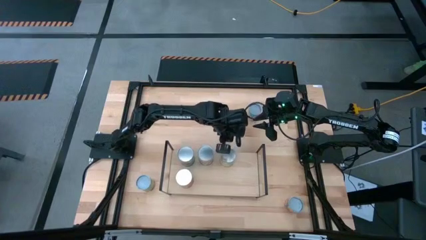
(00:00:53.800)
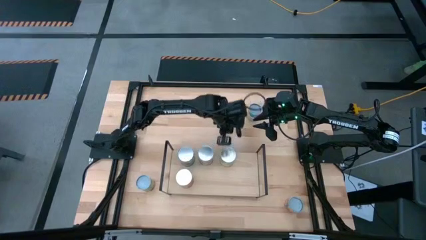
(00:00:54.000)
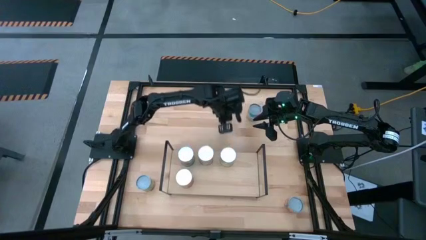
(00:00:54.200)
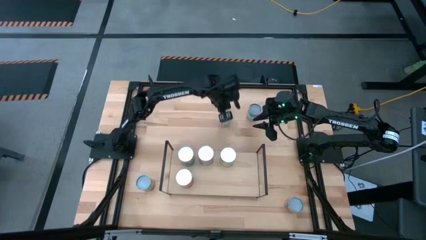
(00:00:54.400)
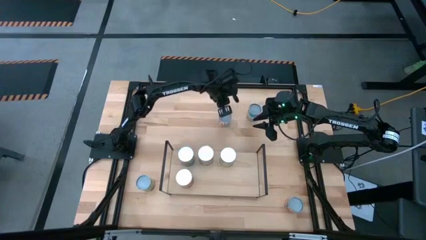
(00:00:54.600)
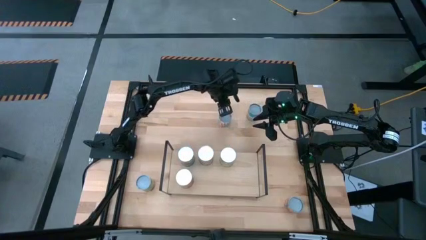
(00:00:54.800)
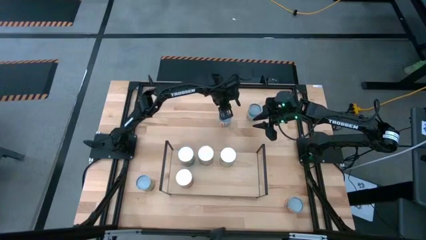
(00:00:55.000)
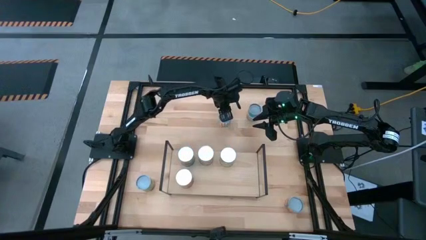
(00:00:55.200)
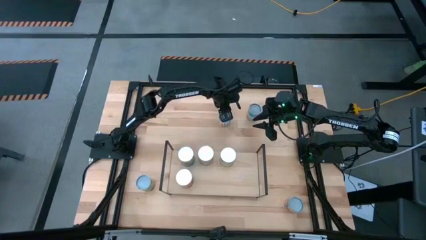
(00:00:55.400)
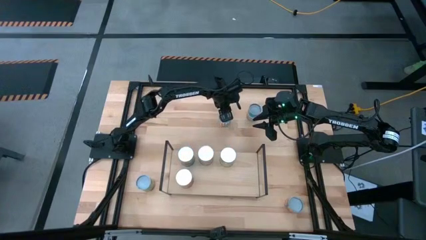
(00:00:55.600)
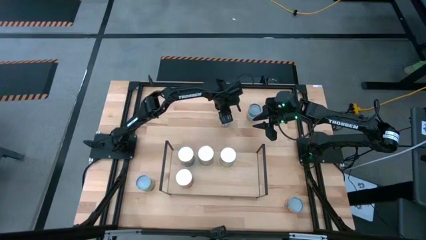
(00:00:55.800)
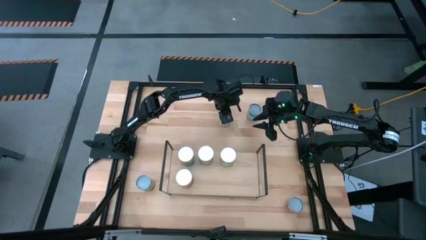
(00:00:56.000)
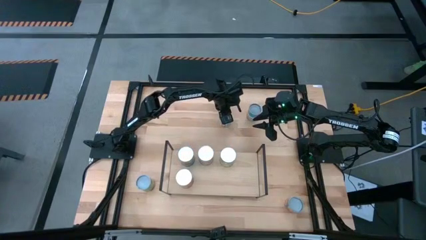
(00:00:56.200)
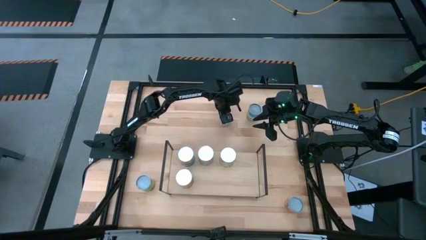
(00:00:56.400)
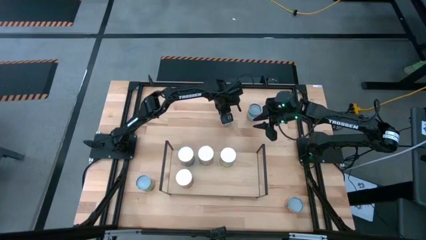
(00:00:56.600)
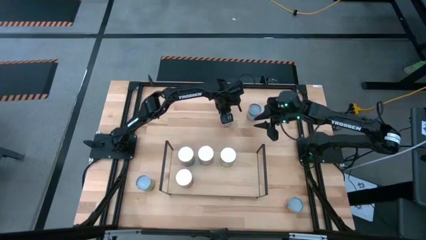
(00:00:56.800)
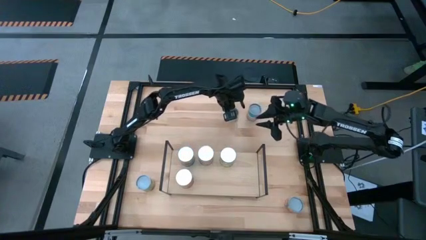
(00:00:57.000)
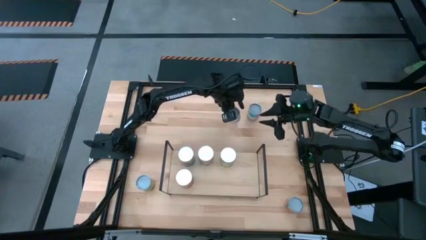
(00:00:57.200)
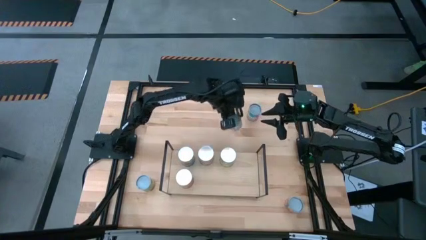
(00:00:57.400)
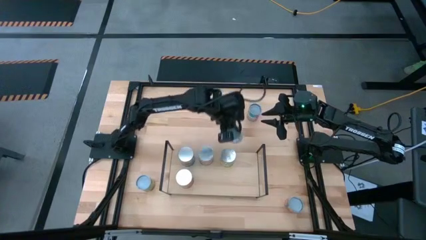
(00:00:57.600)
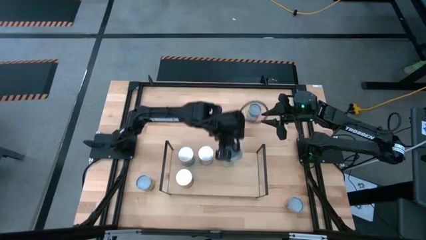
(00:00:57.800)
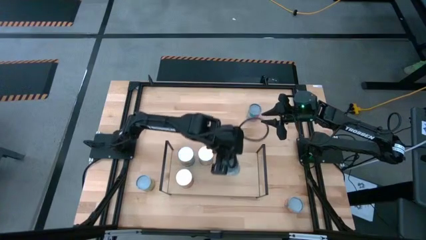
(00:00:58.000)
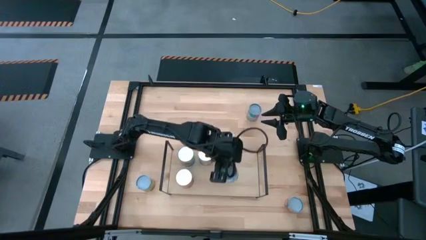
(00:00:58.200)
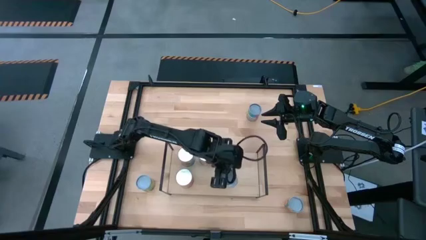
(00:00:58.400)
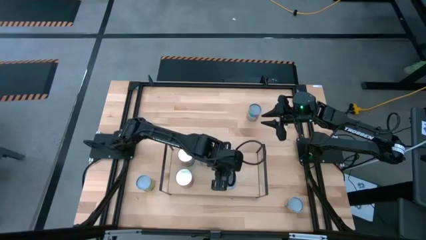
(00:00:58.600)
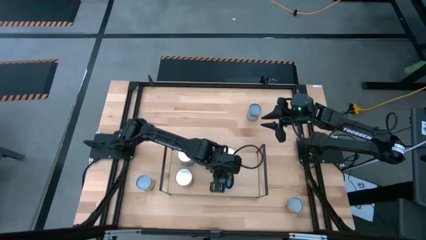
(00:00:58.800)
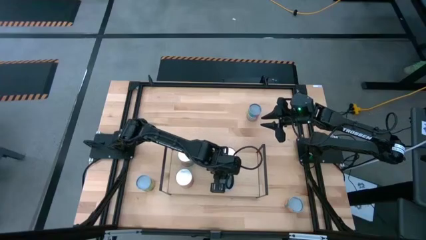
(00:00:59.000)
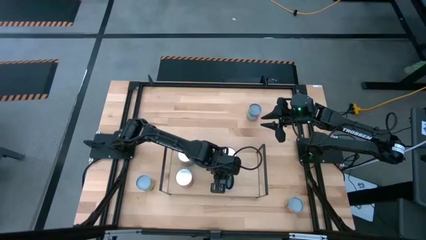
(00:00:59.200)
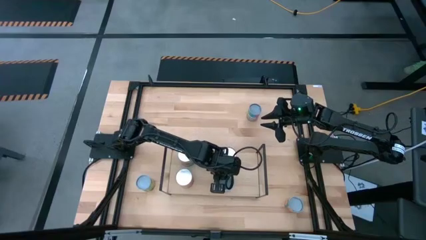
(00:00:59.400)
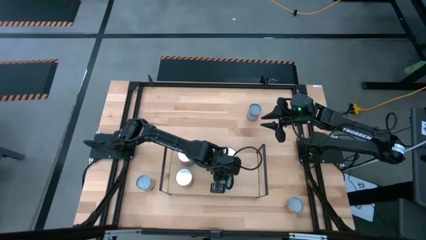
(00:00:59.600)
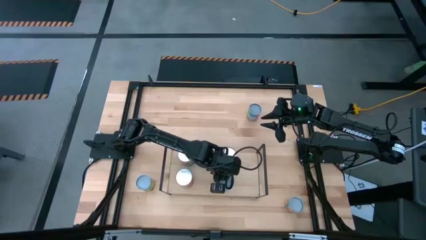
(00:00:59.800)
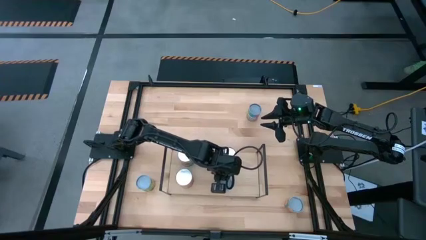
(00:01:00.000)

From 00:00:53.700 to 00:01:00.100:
Task: Pick and place cans onto a shelf
Put the white green canned carrot on the shelf

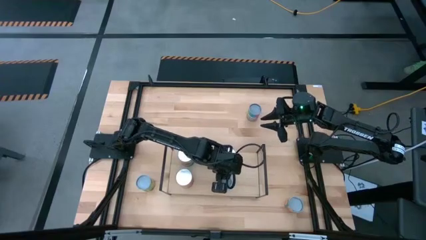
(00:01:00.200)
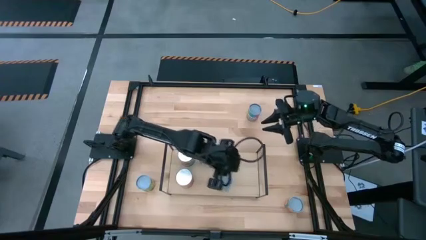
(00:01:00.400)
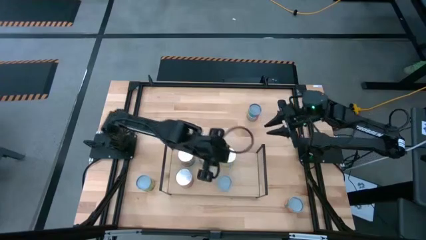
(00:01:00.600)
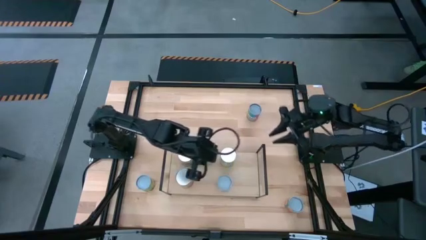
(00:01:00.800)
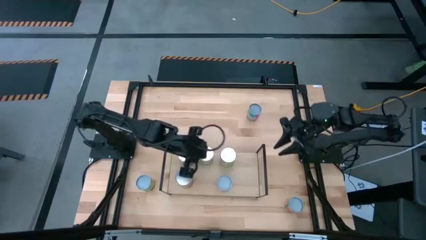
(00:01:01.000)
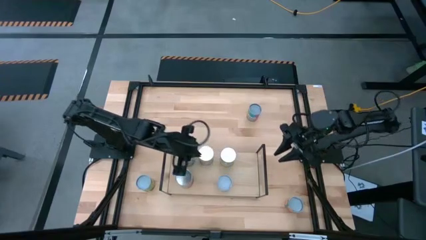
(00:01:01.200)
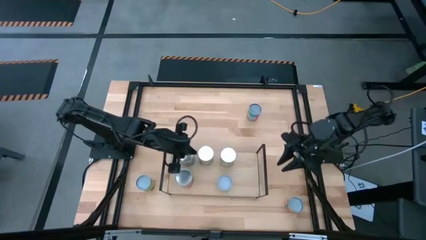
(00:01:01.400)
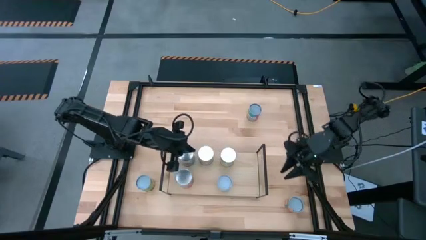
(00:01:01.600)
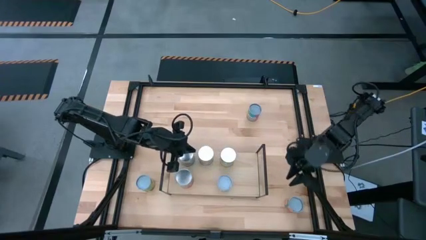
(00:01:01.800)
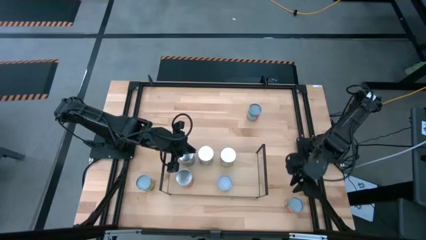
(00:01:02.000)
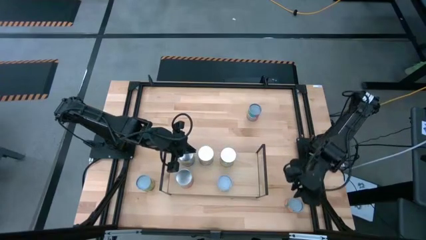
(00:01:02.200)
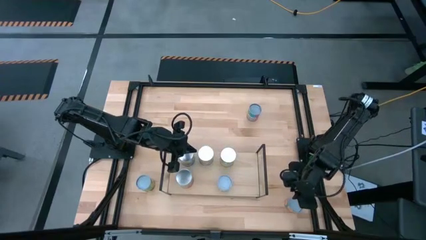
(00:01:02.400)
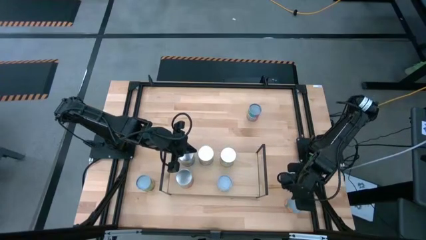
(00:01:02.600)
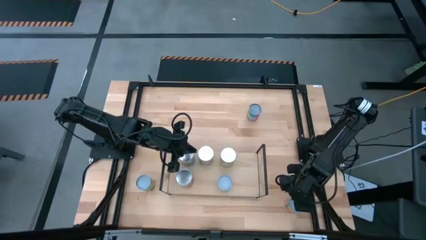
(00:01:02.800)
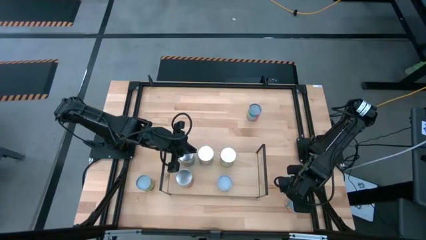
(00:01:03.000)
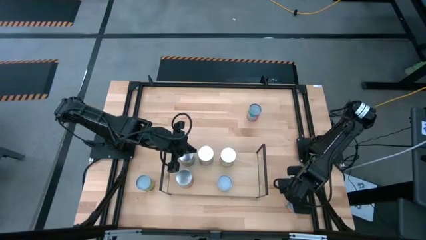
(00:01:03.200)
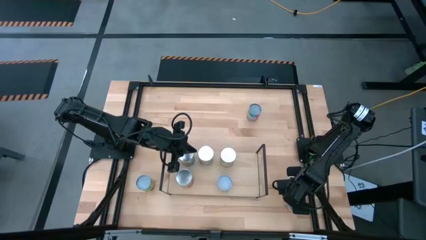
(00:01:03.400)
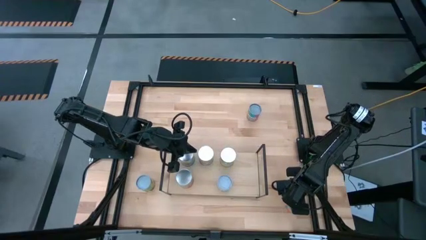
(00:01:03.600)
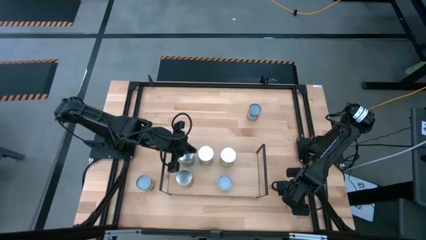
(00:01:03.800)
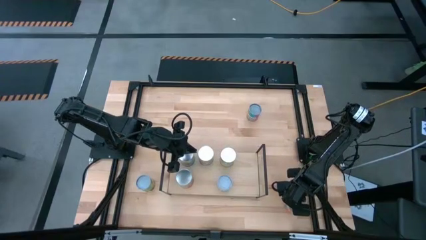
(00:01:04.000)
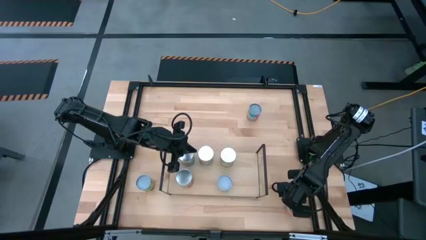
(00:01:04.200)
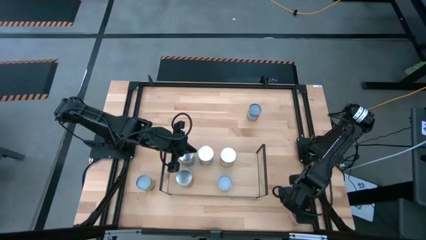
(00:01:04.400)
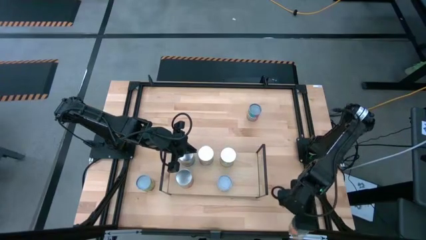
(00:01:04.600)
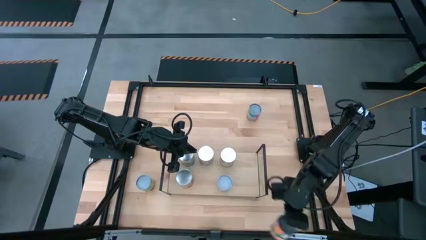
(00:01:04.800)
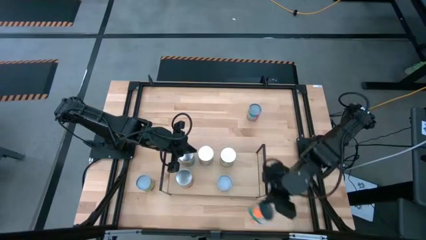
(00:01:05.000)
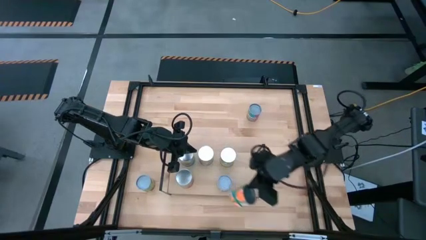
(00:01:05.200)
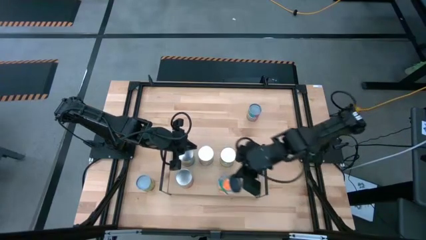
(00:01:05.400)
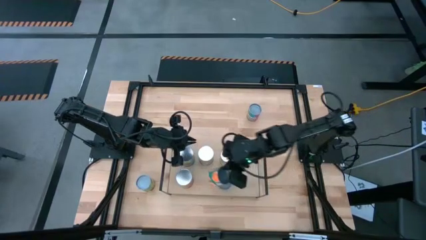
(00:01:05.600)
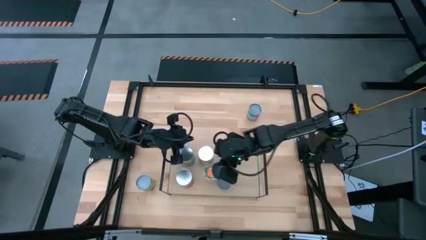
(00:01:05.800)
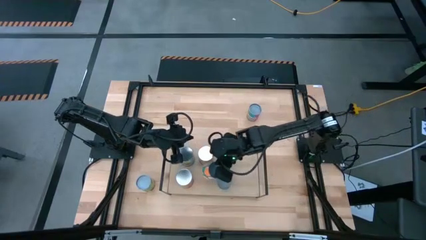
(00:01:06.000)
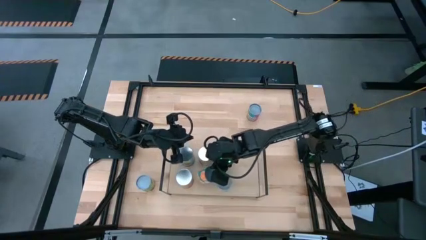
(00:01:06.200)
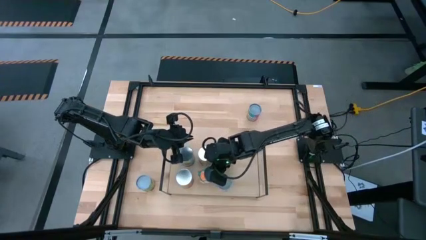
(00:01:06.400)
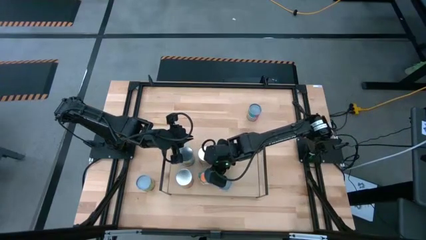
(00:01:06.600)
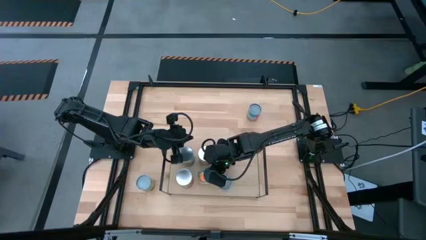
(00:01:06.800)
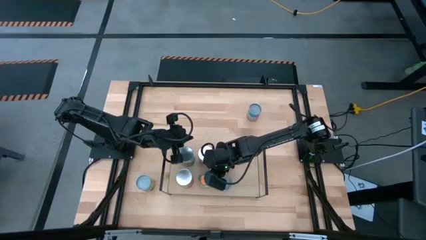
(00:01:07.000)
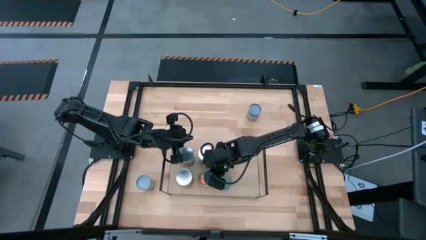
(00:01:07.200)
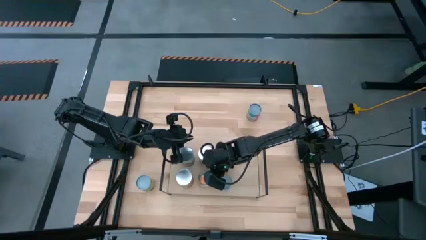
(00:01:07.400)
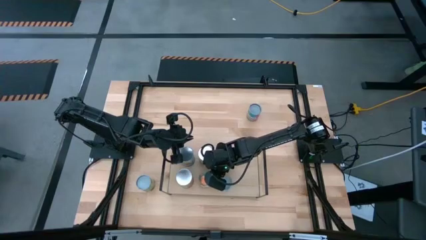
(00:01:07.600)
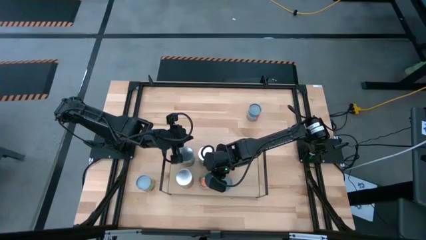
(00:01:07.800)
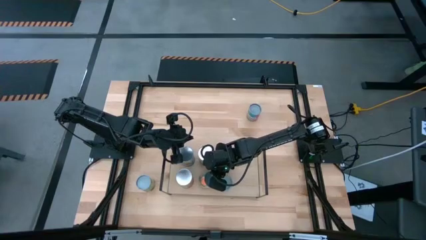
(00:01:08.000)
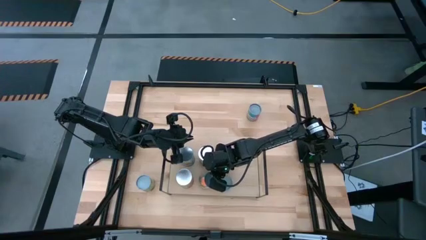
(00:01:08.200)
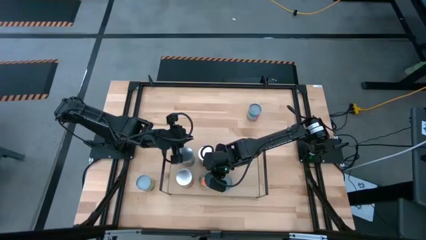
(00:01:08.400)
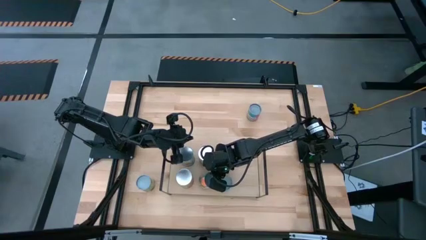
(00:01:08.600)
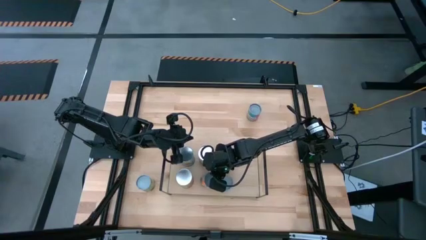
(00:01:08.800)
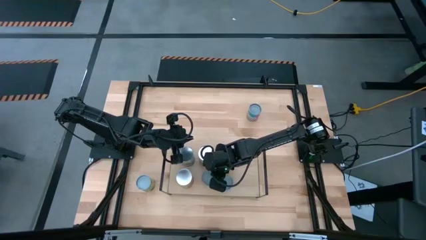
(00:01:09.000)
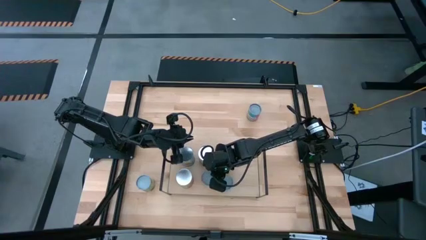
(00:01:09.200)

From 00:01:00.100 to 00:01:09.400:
Put the white green canned oranges on the shelf
